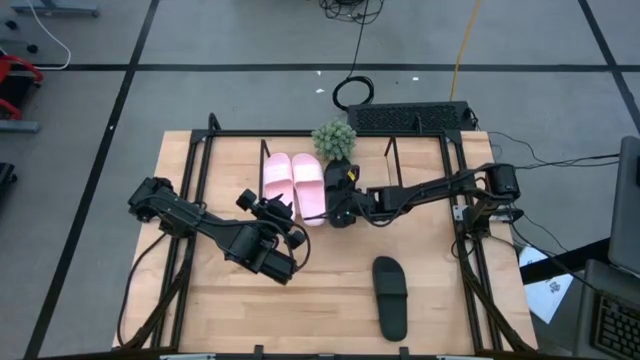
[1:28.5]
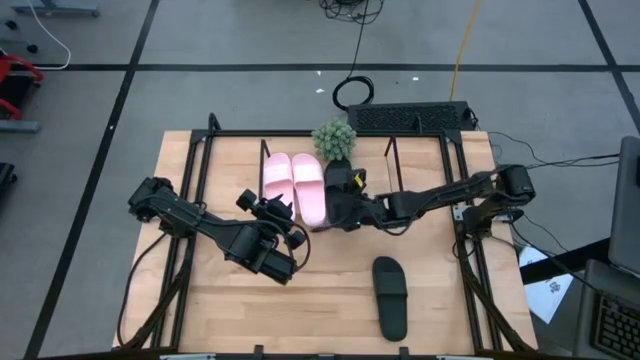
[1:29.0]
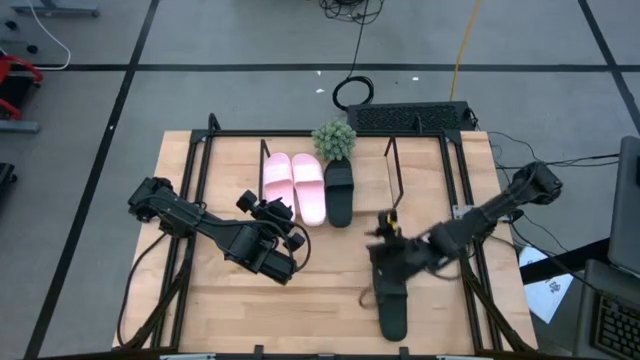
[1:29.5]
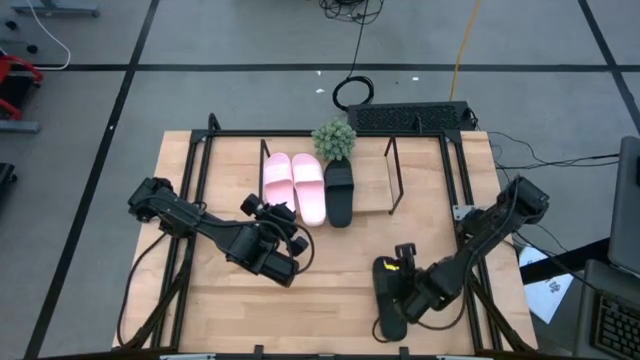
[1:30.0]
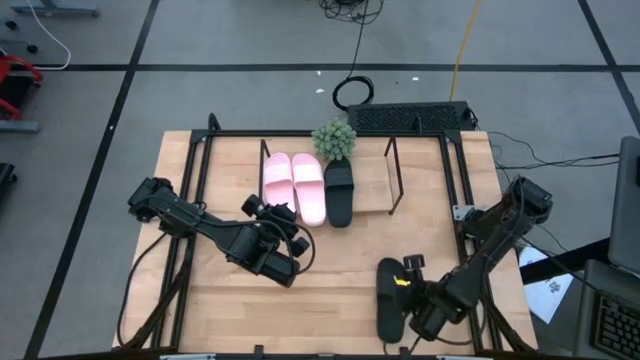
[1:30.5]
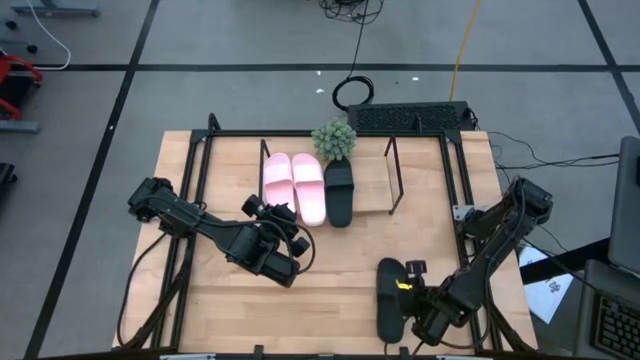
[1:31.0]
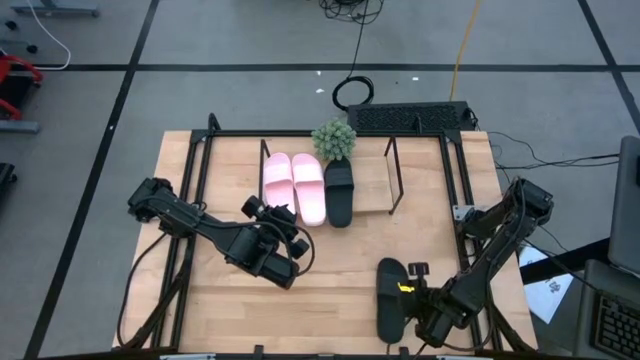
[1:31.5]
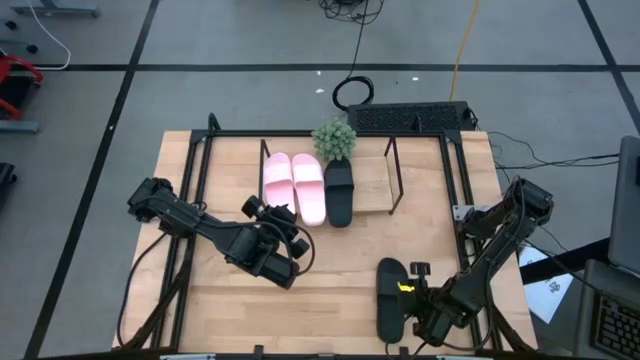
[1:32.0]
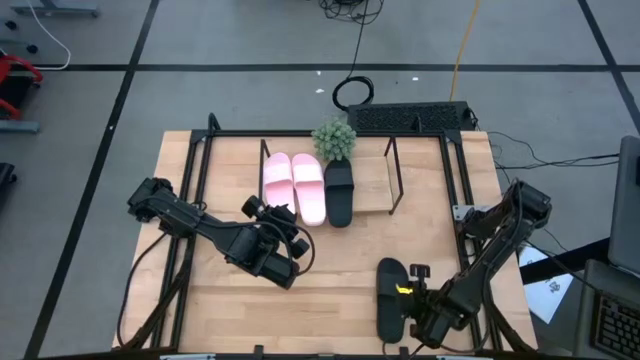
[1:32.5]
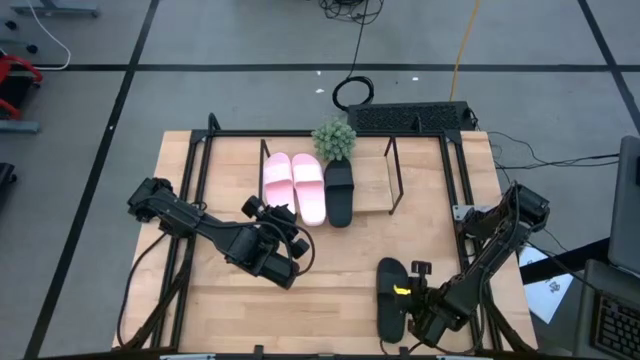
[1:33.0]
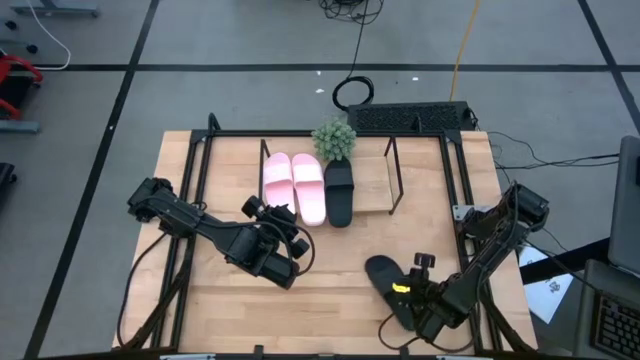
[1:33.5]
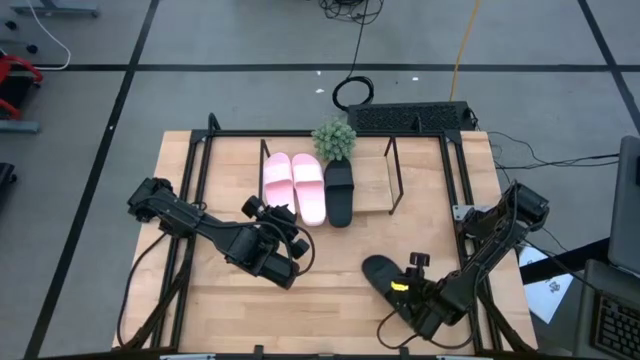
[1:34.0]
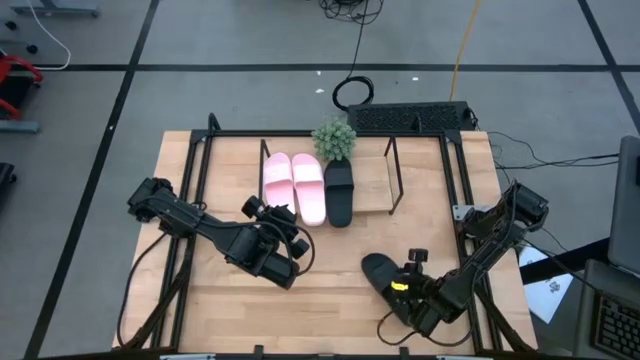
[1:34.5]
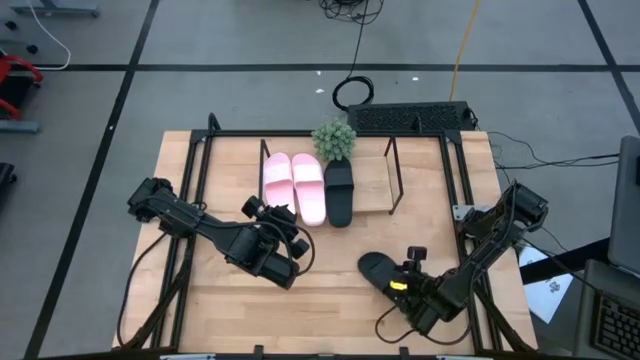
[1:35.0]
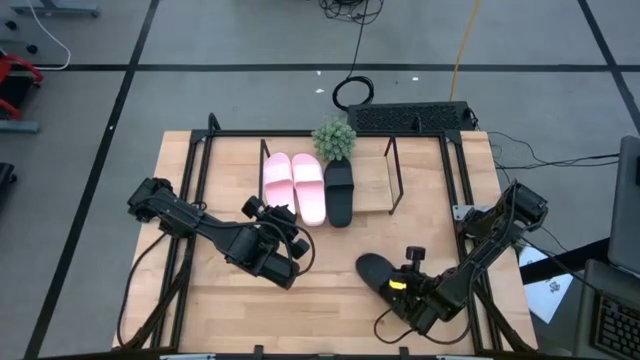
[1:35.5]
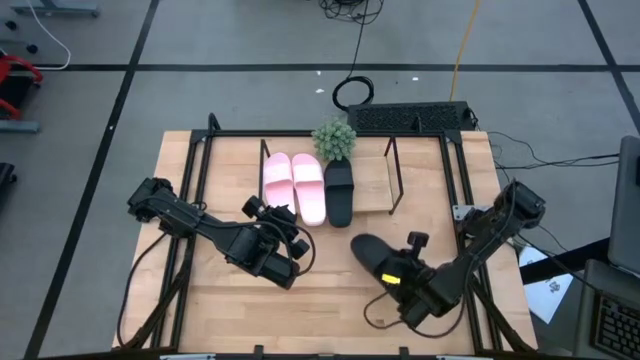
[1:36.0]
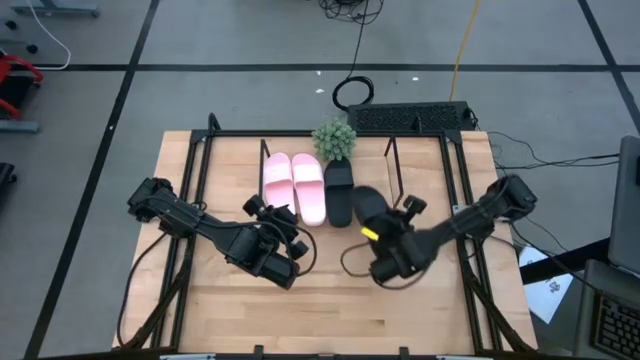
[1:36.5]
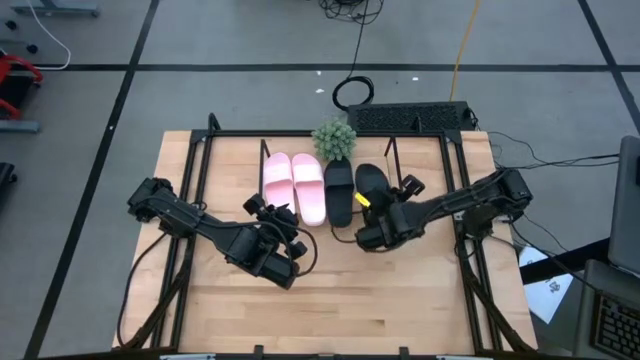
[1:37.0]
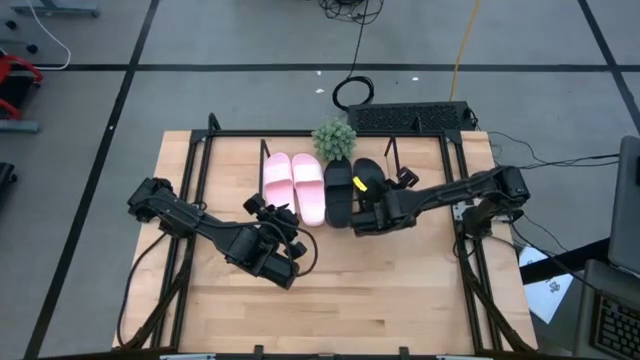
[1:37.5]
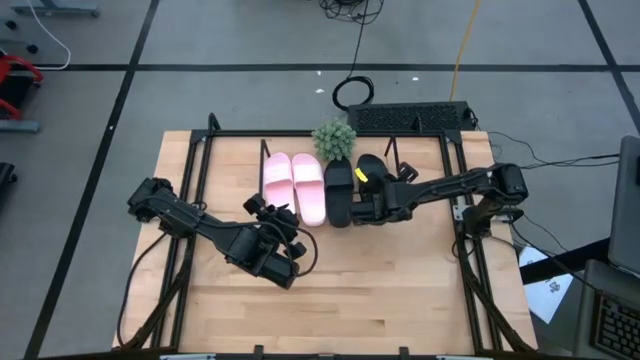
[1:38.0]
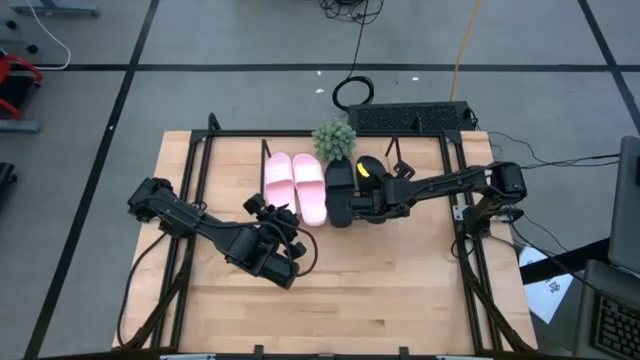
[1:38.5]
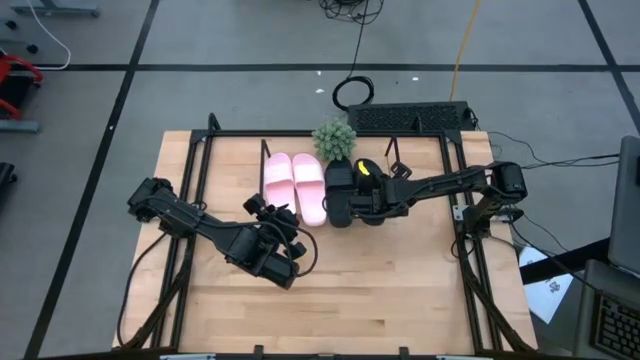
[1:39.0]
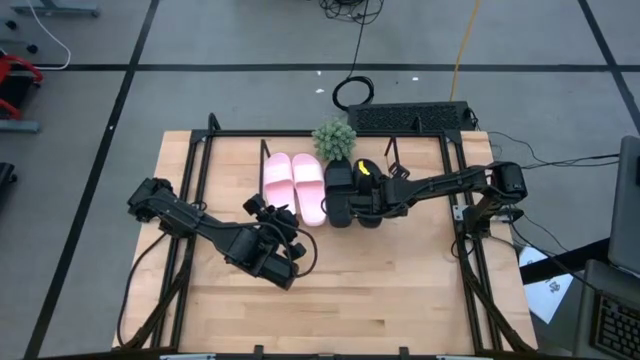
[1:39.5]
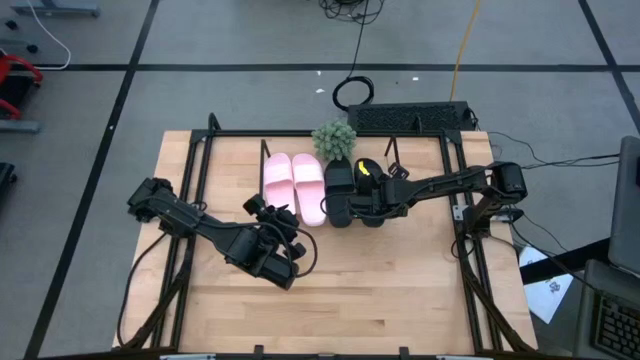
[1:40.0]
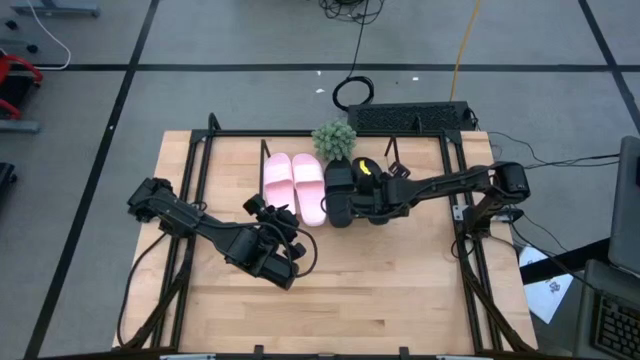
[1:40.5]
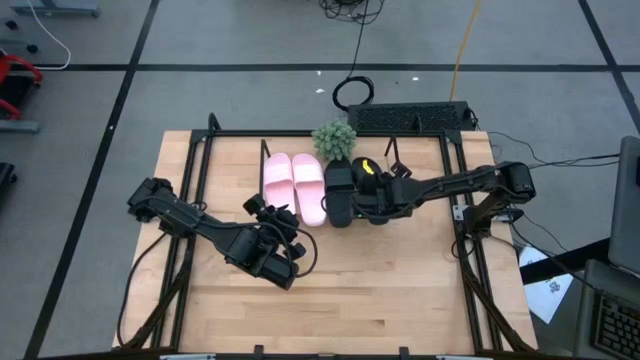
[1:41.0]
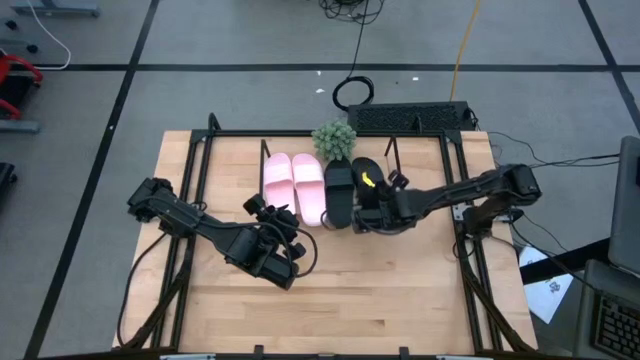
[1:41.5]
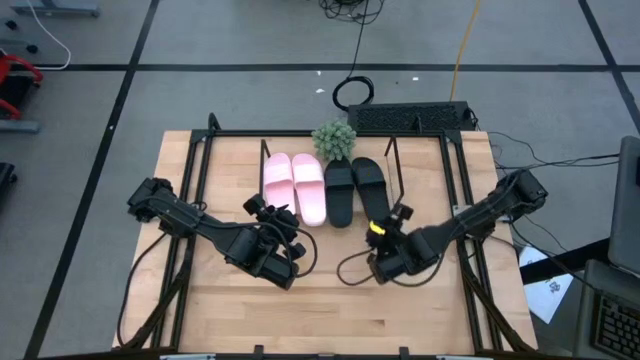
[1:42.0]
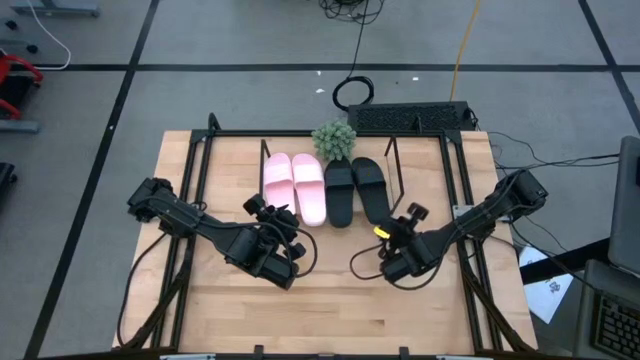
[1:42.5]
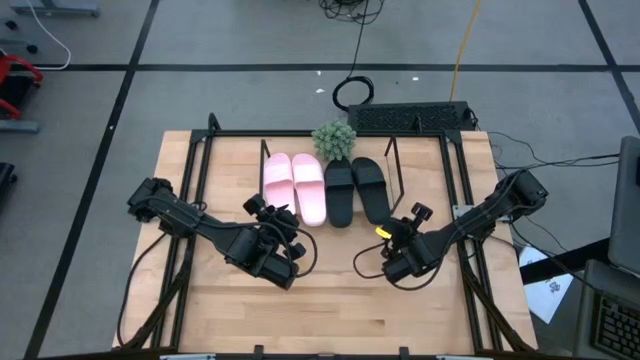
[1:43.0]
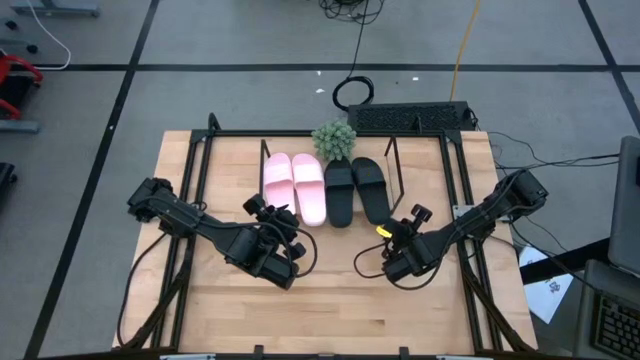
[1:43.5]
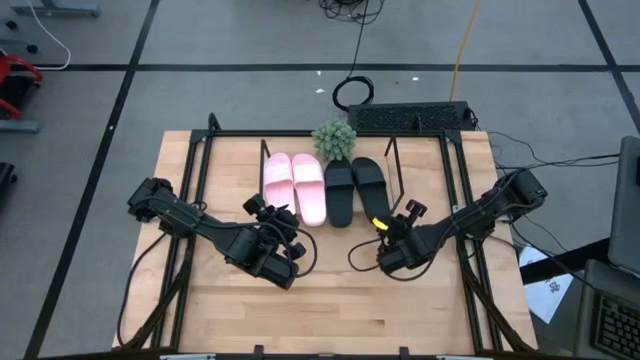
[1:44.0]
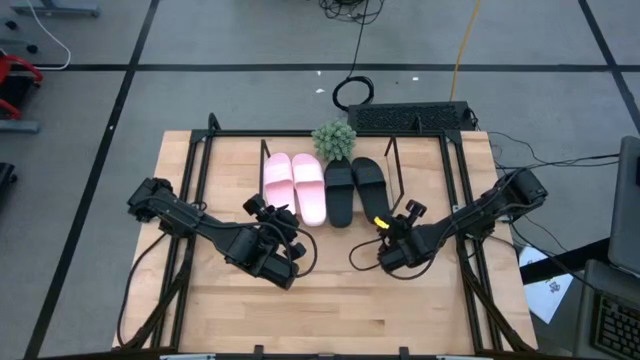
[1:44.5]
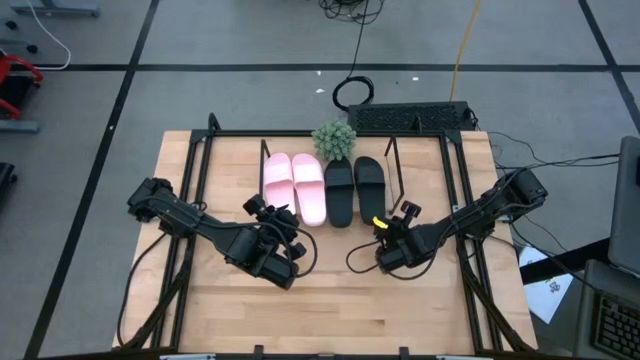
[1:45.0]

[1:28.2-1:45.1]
Task: Pick and place slides into the shelf
Put the right black slipper on the shelf
